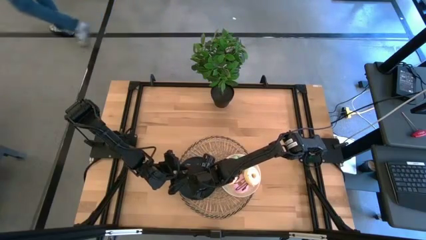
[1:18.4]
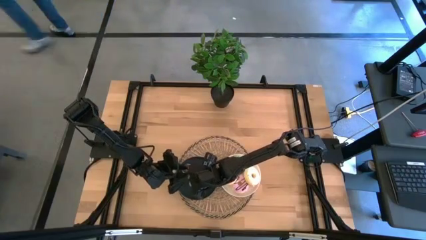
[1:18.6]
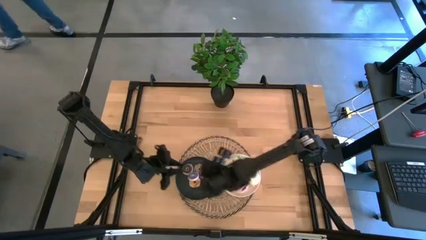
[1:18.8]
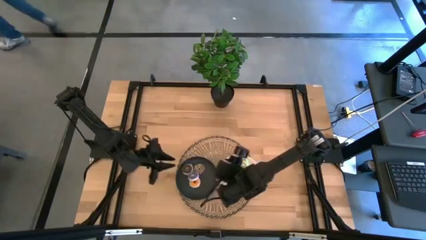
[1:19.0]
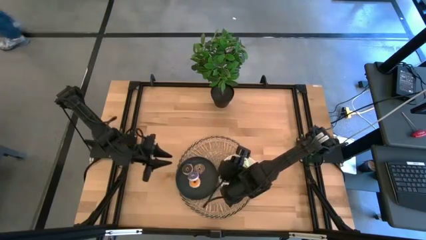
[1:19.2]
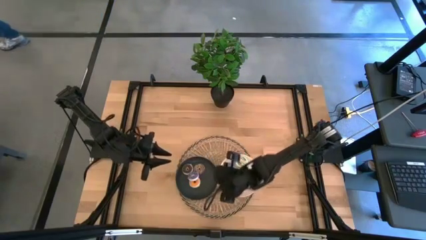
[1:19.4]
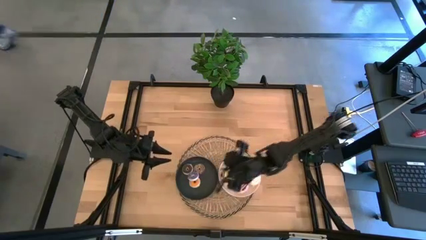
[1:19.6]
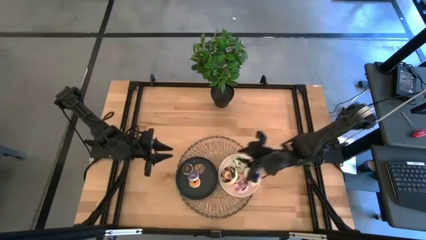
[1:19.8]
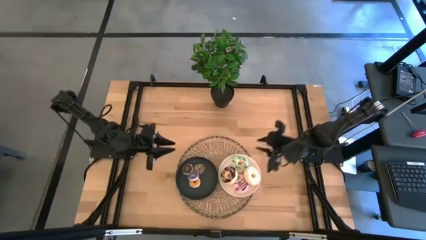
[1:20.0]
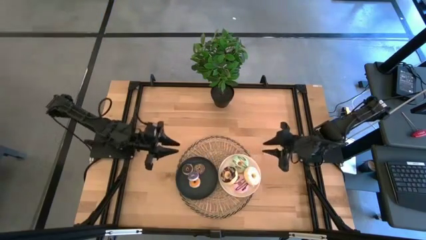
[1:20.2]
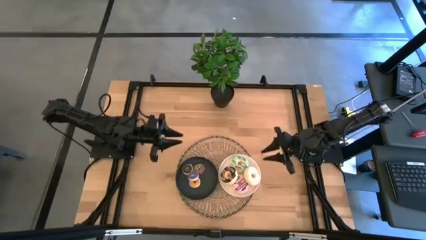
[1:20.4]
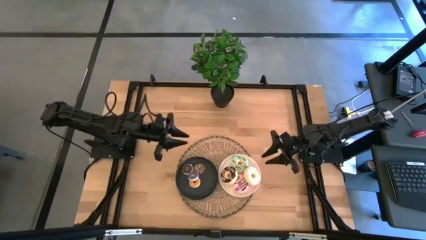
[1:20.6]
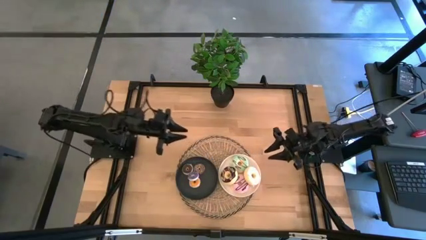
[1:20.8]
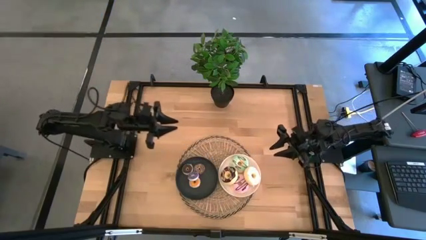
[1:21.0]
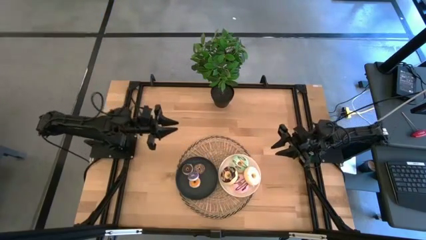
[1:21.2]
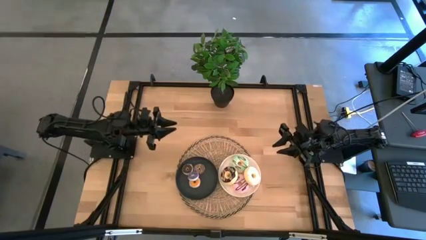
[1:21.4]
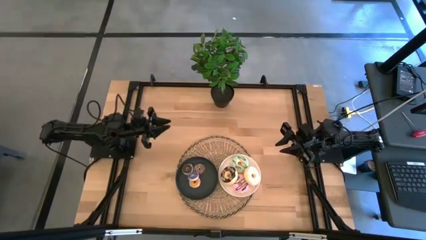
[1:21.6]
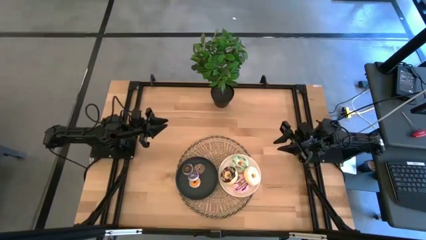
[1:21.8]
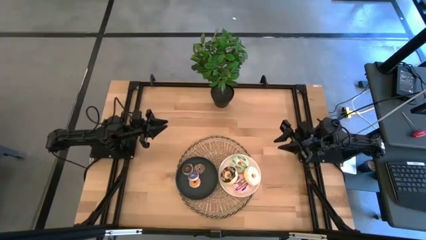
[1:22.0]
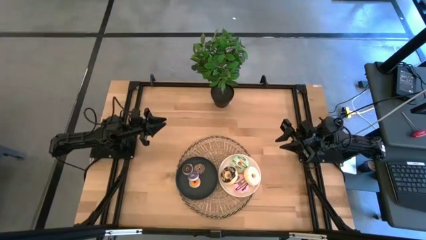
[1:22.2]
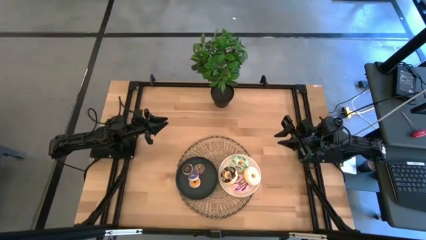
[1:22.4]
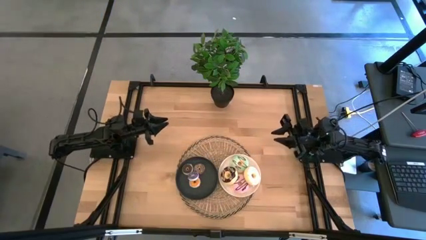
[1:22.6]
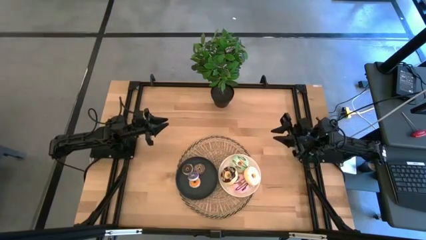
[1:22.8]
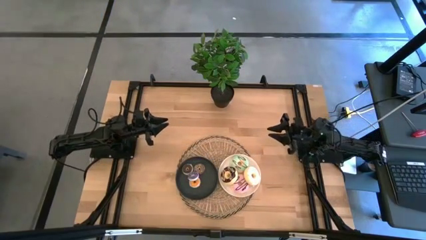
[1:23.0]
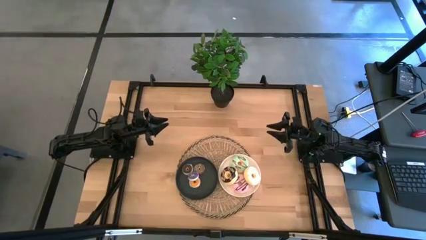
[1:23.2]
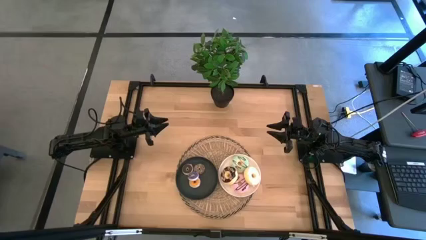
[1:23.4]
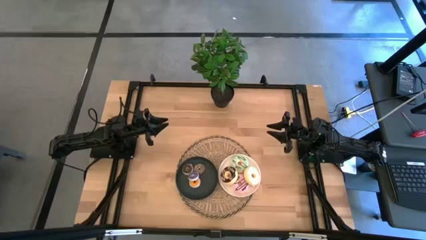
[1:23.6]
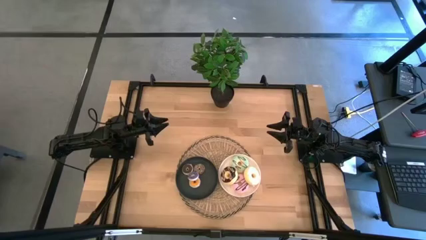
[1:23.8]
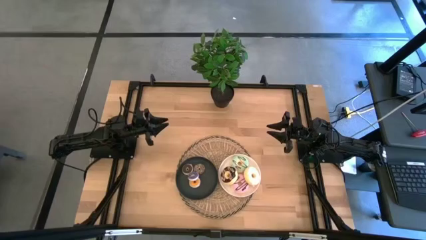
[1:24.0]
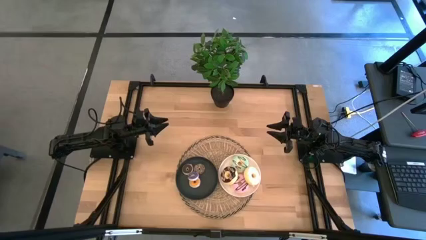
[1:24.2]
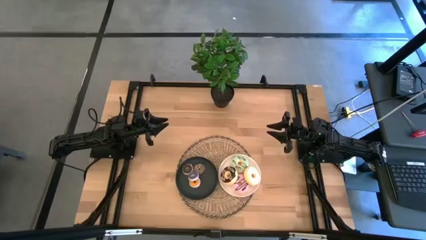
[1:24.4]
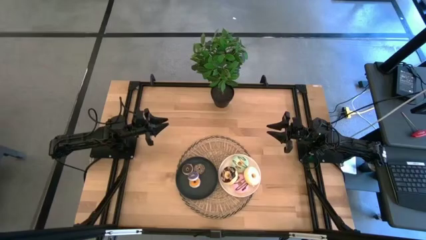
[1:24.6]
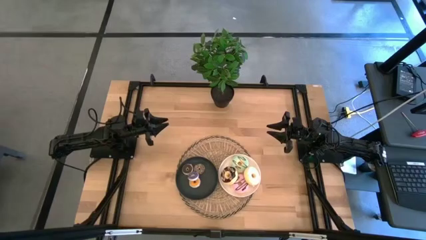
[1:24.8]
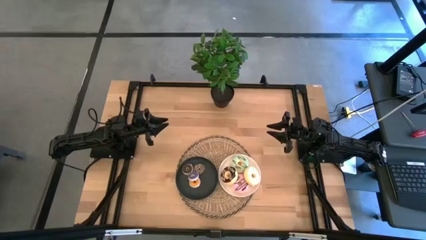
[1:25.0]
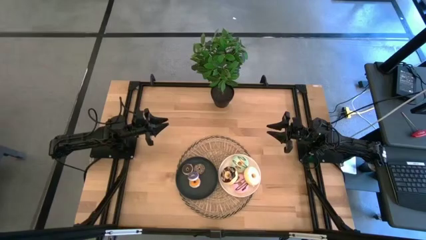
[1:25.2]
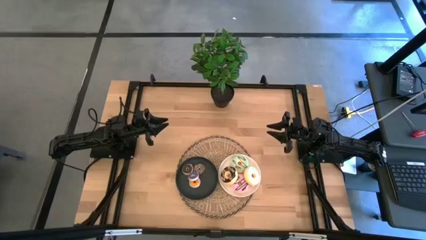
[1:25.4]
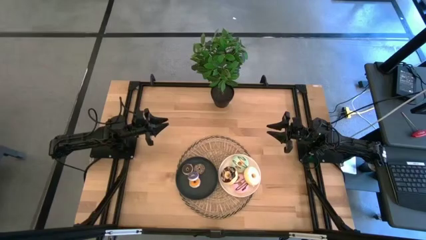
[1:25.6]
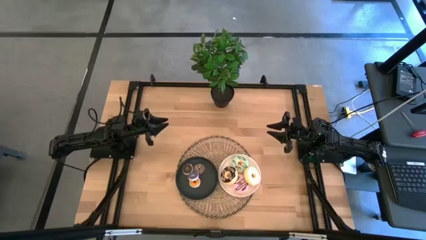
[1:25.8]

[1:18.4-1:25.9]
Task: Pick & Place donuts
Return to Home Position
